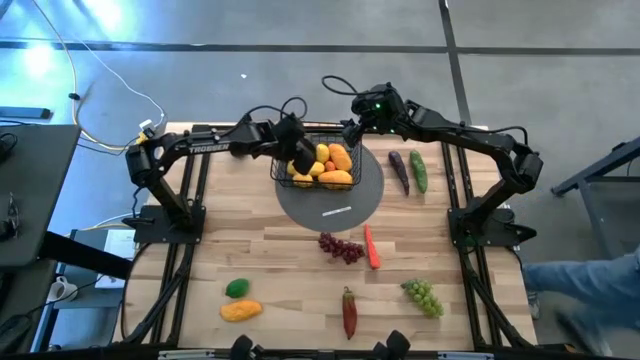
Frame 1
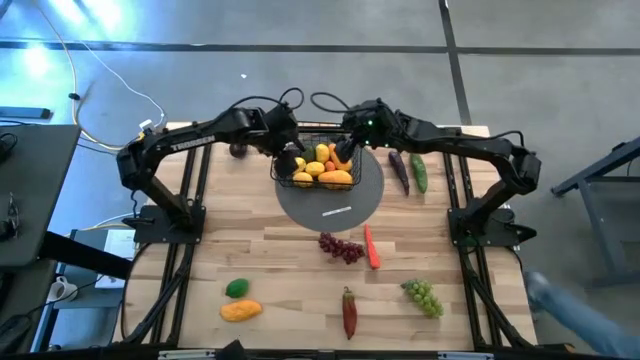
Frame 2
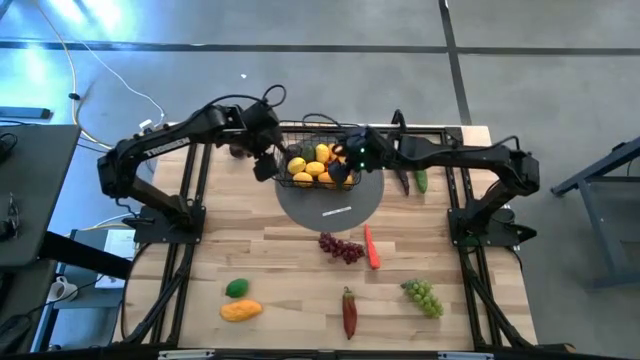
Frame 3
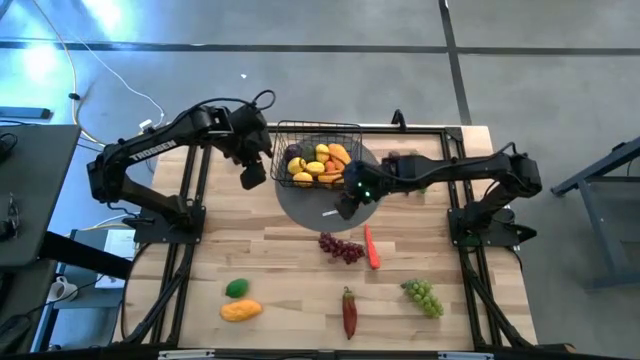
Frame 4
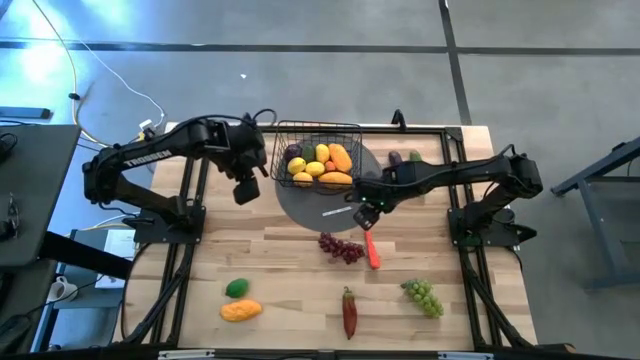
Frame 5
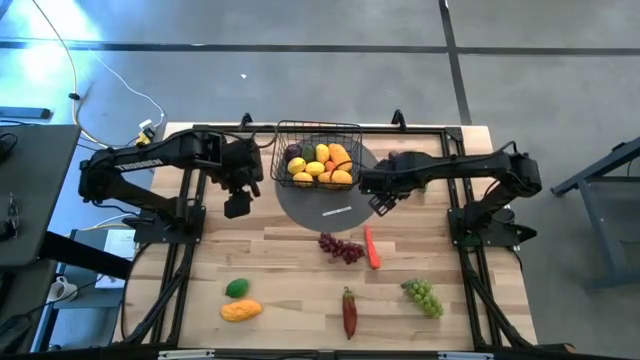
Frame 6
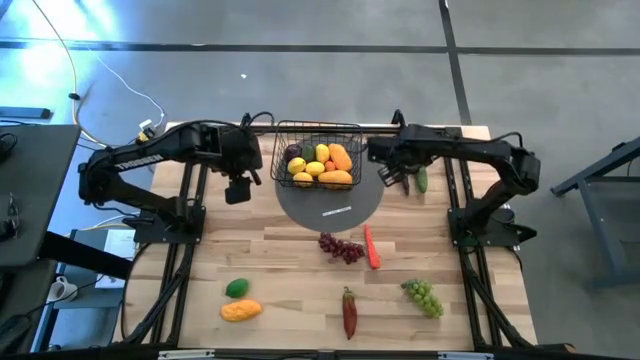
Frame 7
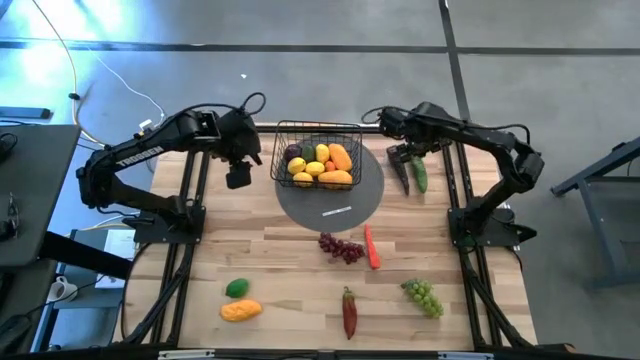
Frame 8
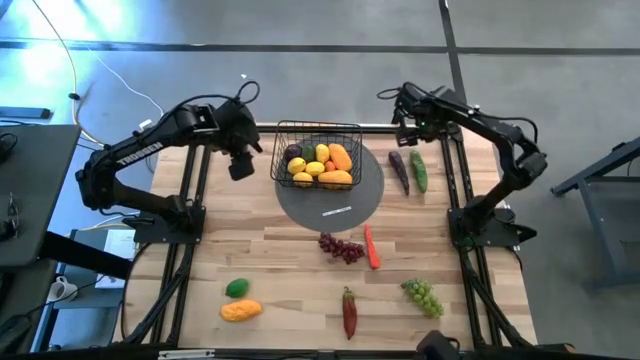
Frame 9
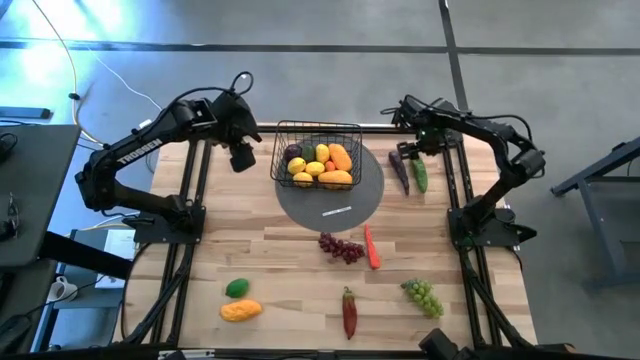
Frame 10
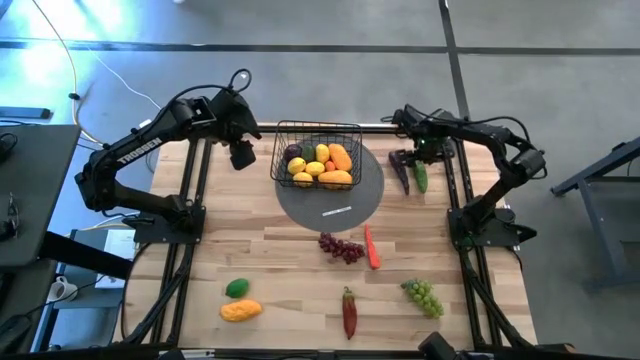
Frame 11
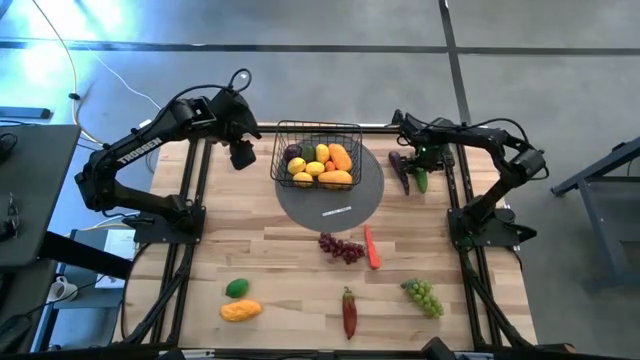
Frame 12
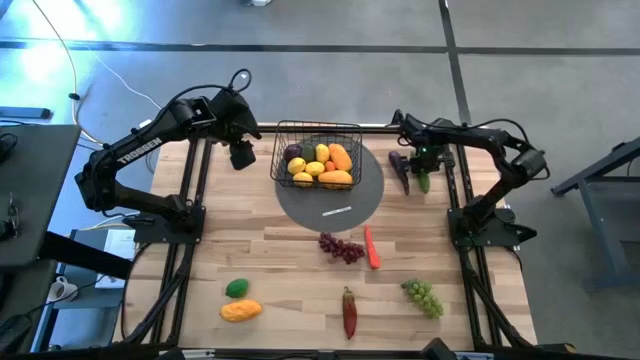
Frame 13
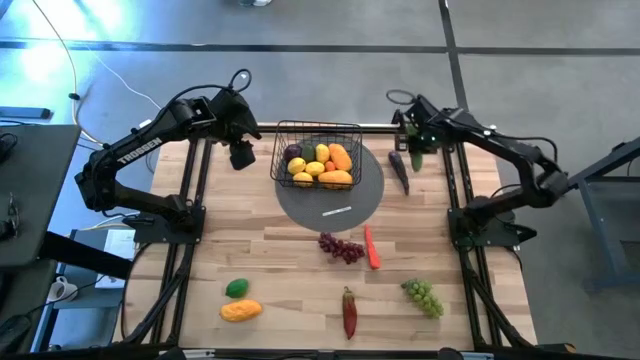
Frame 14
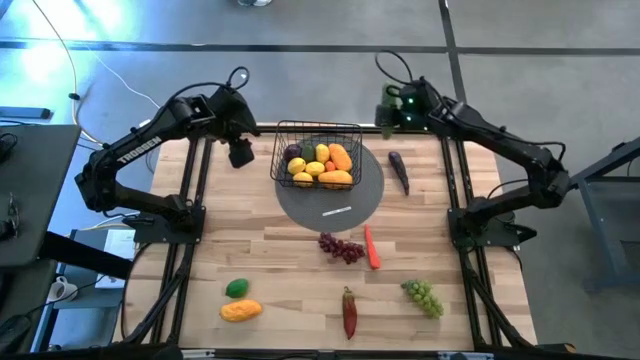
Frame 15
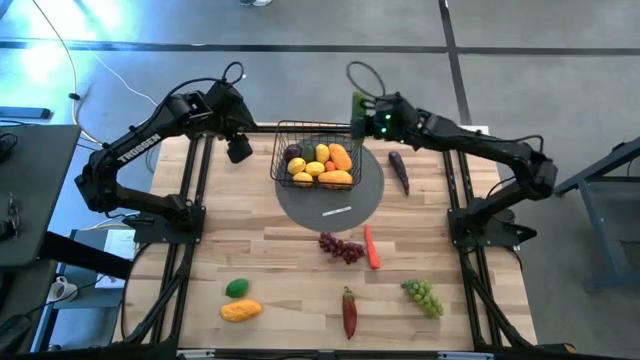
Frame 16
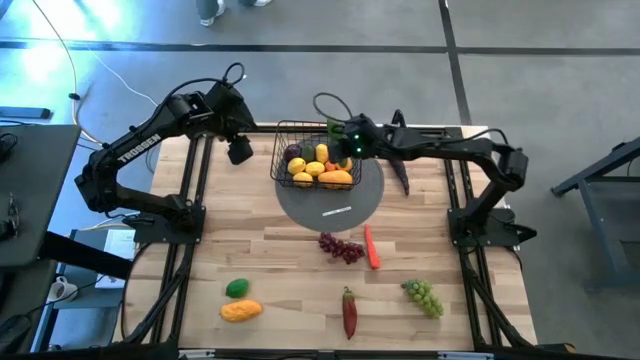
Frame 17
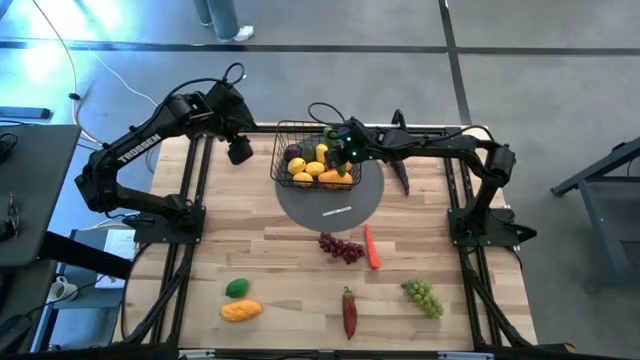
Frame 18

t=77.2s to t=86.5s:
Task: Build produce basket
Put the green cucumber into the black wire basket

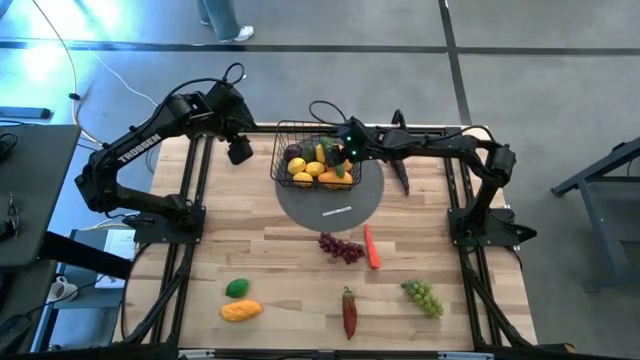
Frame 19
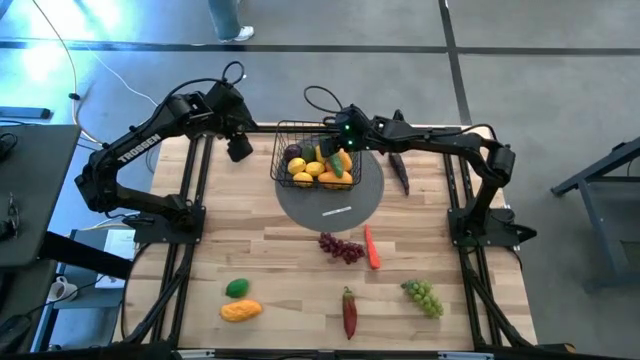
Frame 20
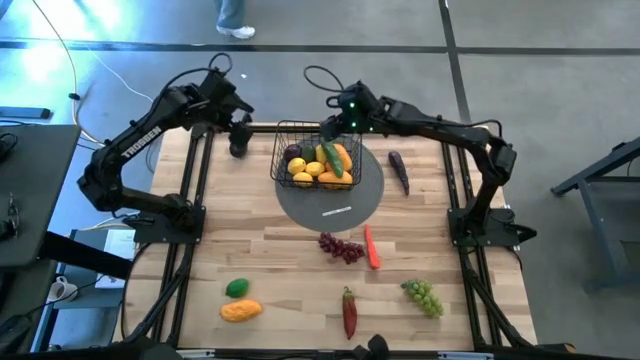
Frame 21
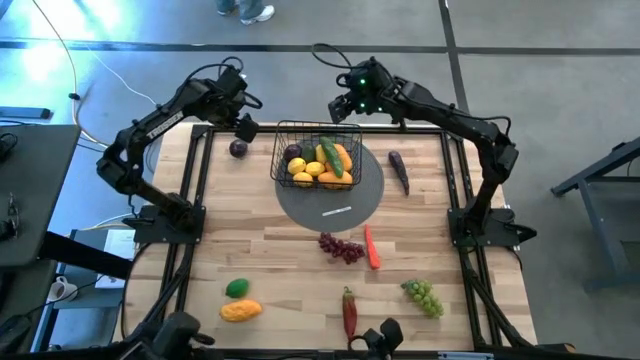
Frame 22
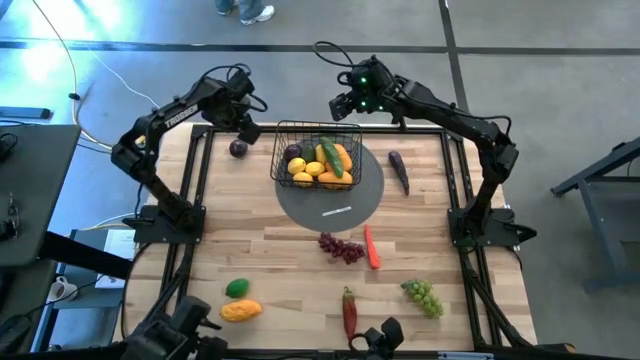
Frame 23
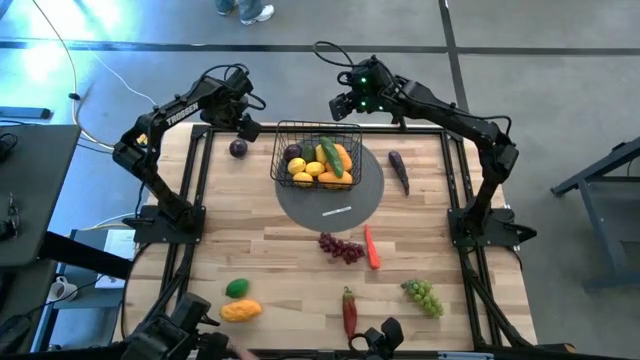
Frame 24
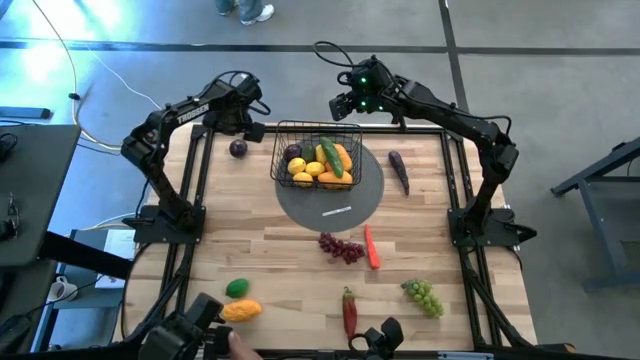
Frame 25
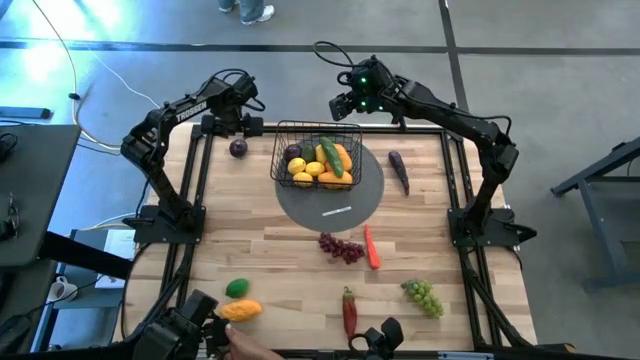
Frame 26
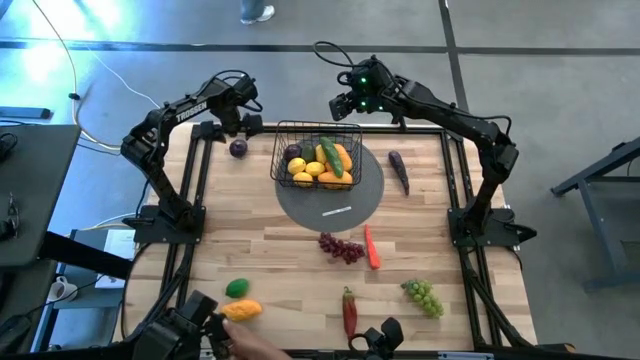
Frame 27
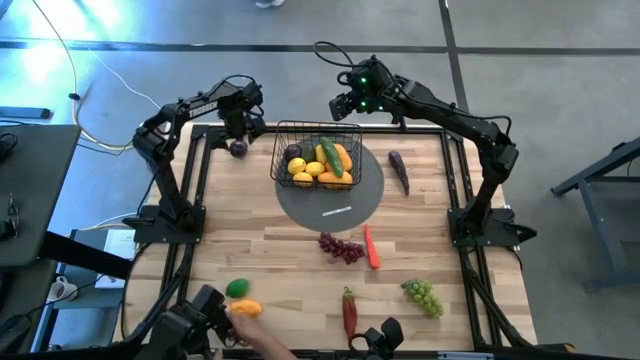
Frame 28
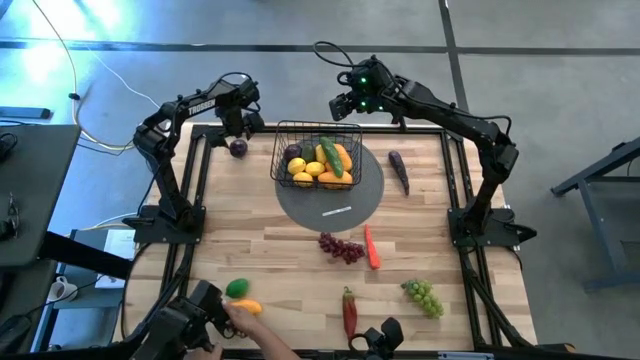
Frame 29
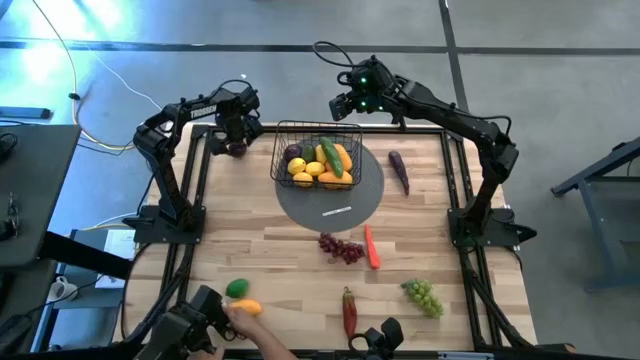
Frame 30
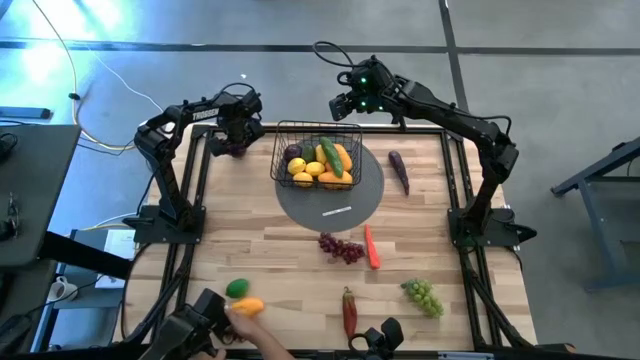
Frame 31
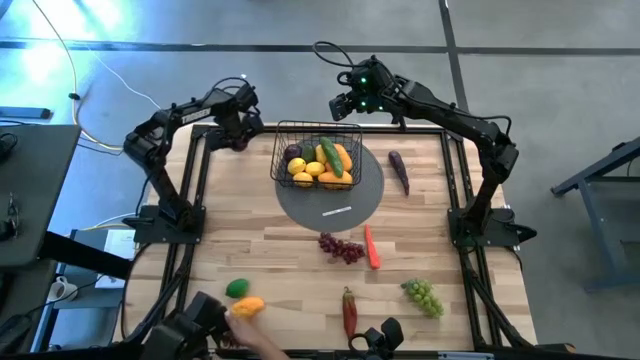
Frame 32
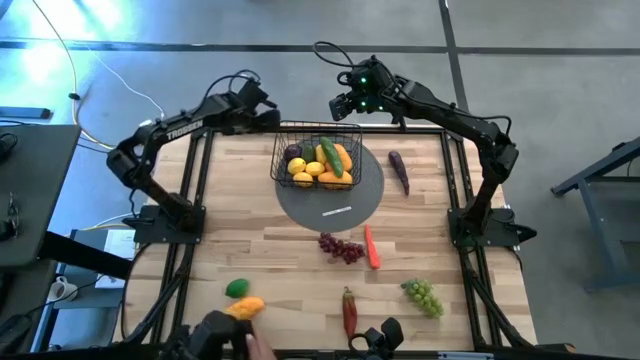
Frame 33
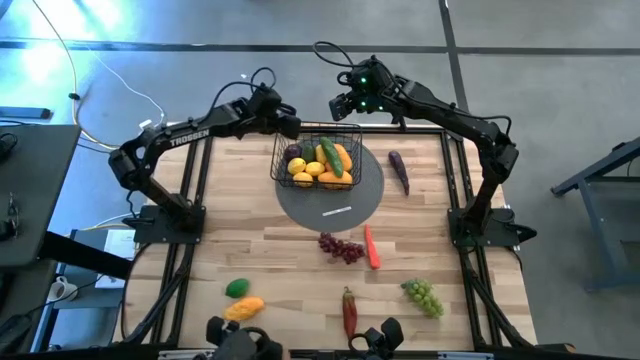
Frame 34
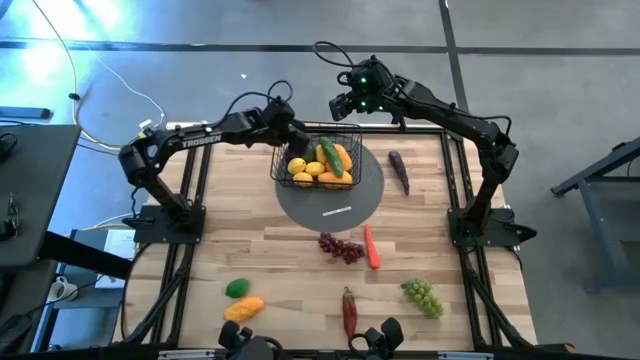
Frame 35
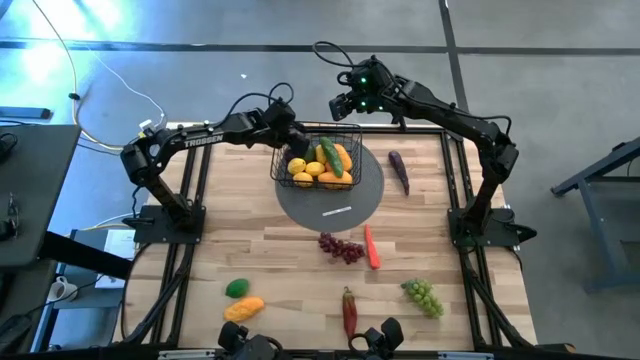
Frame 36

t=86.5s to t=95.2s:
Put the purple onion into the black wire basket

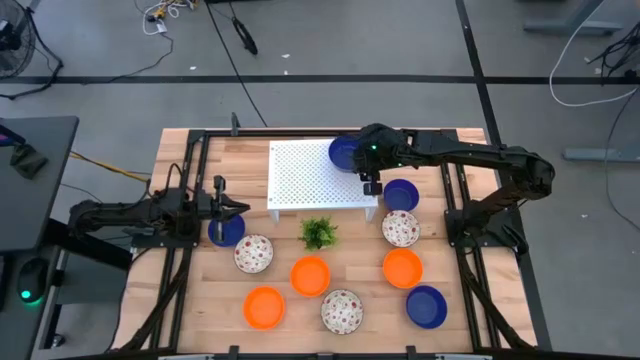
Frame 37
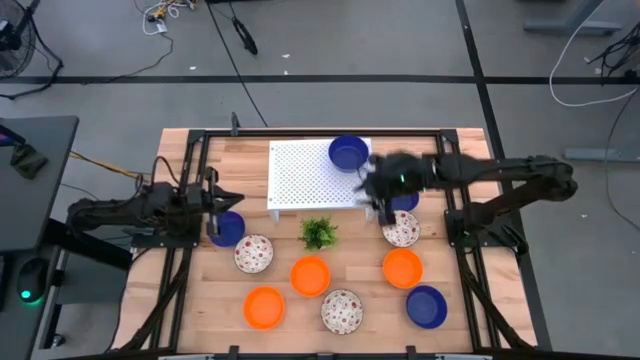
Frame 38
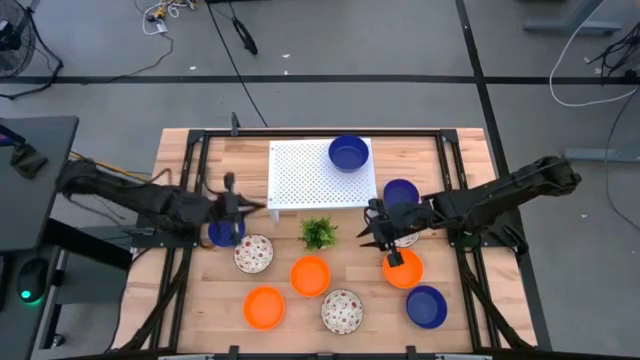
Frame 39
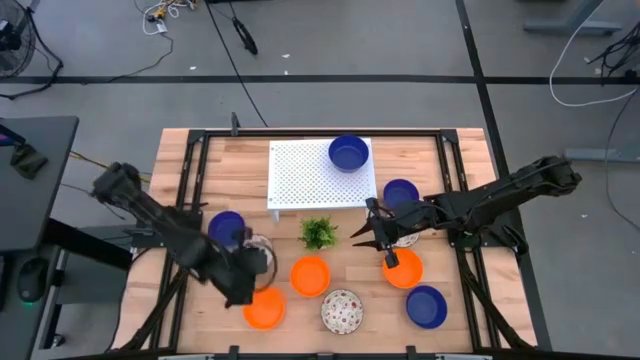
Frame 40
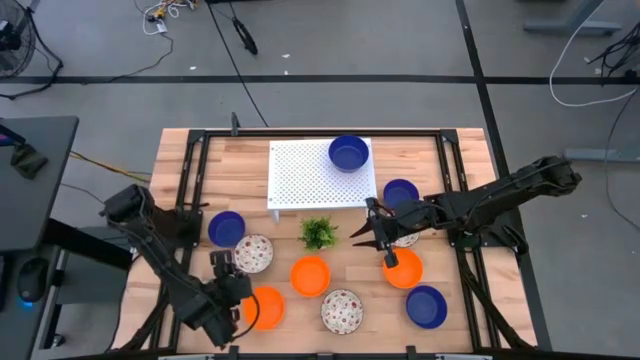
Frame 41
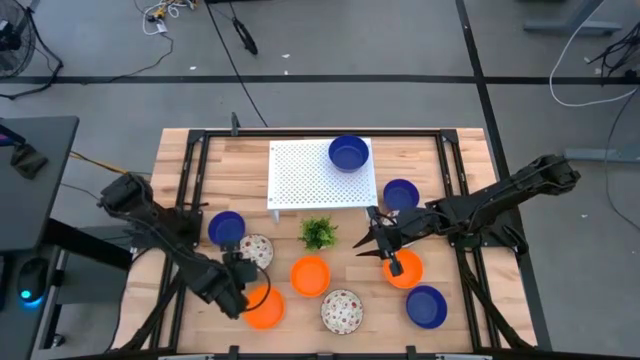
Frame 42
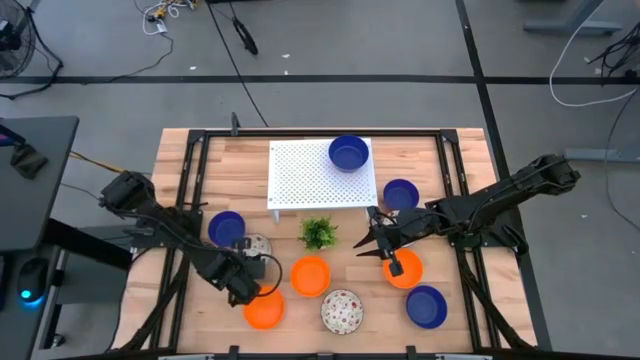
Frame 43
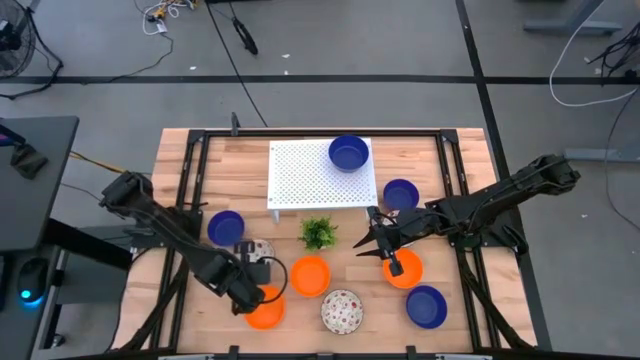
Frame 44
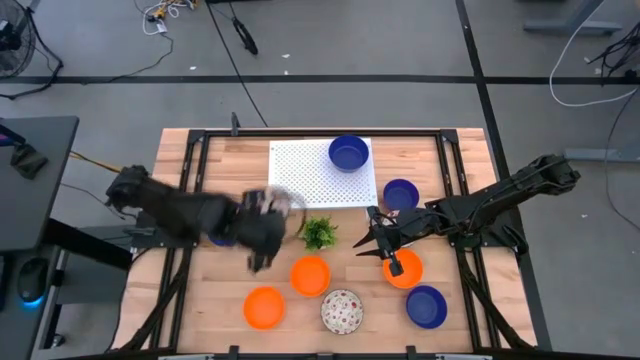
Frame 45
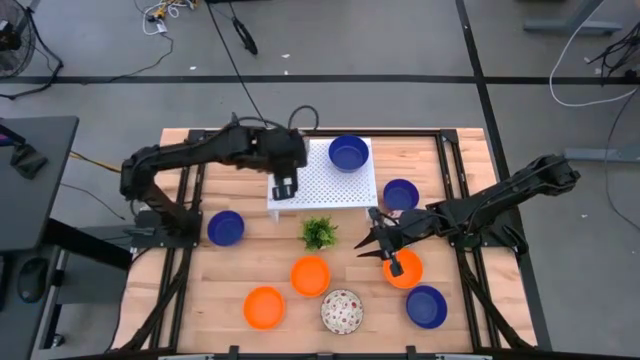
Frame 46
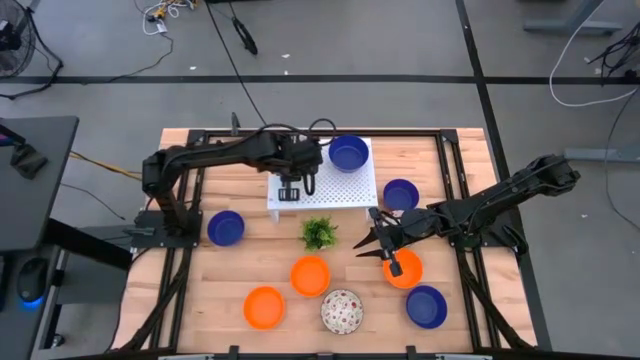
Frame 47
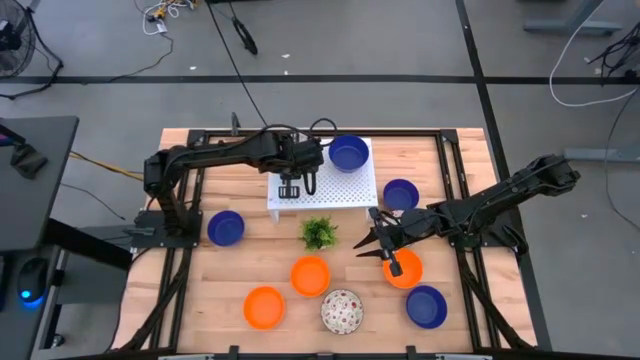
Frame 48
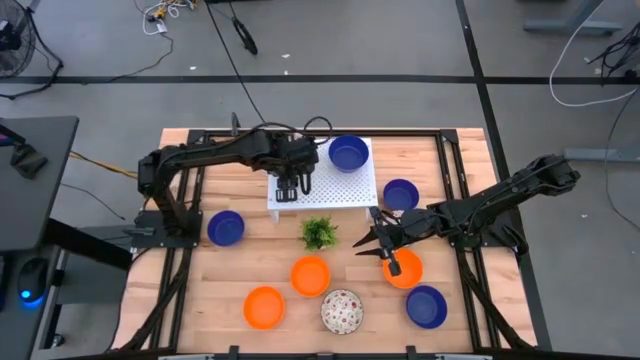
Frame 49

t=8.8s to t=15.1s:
Task: Pick & Place Mini bowls
Put the white bowl on the shelf
